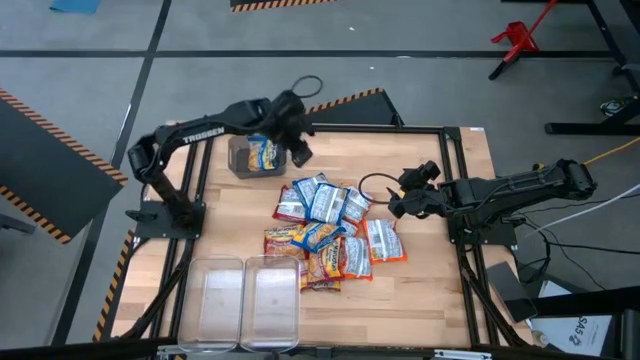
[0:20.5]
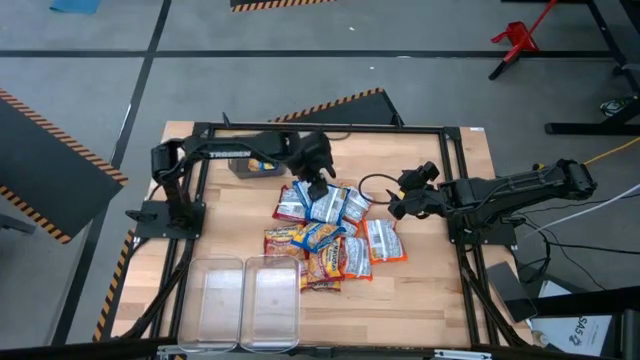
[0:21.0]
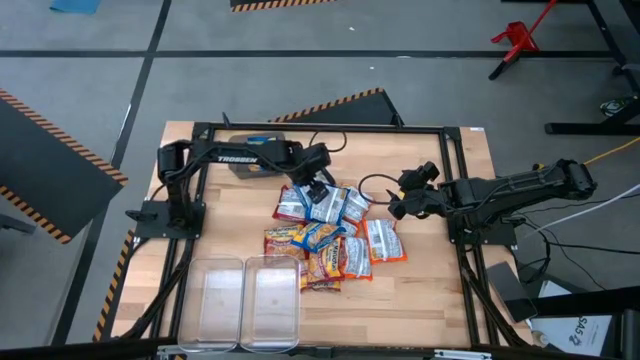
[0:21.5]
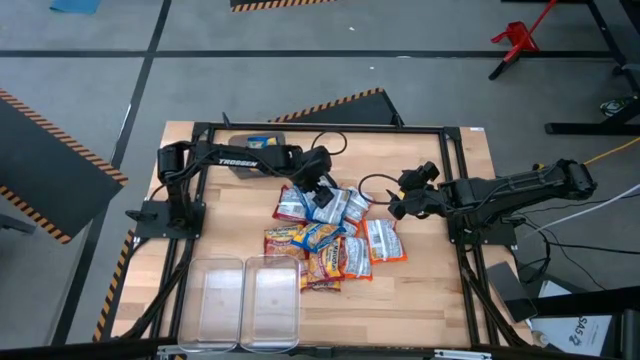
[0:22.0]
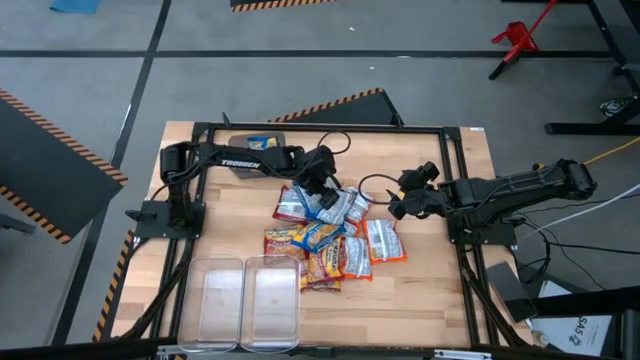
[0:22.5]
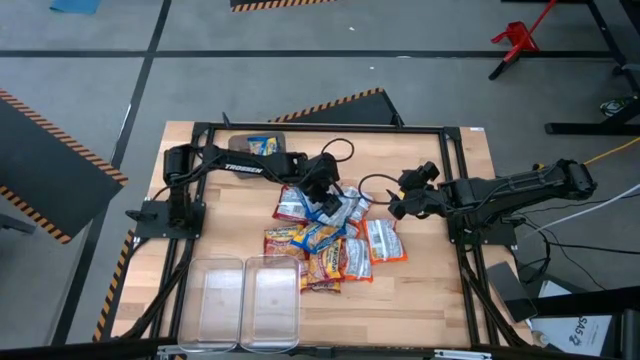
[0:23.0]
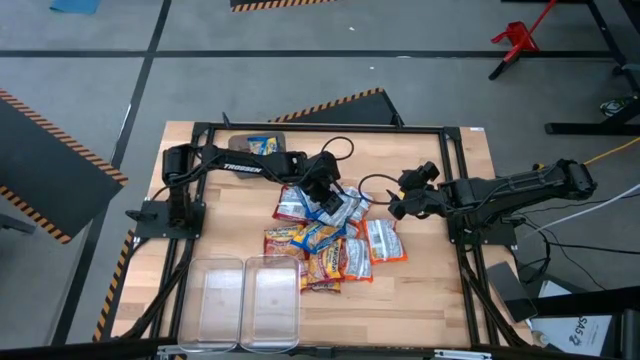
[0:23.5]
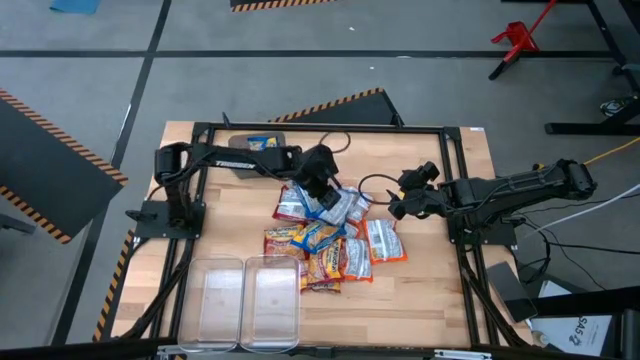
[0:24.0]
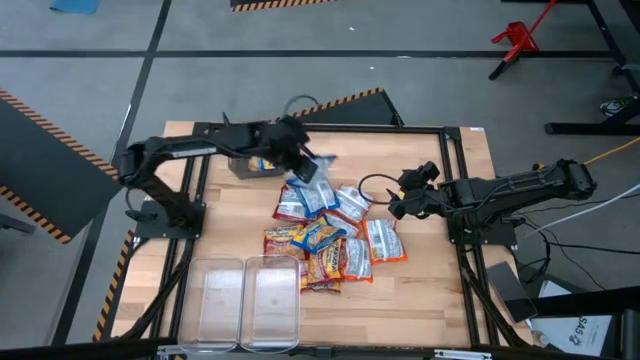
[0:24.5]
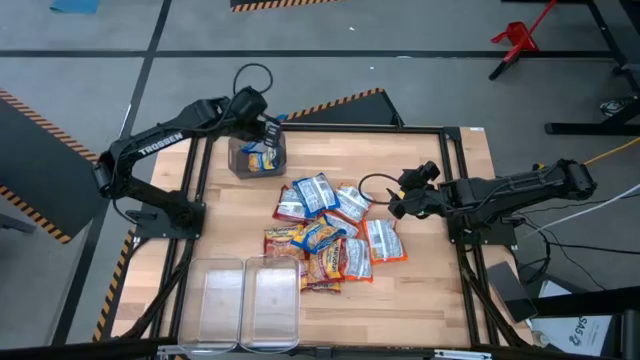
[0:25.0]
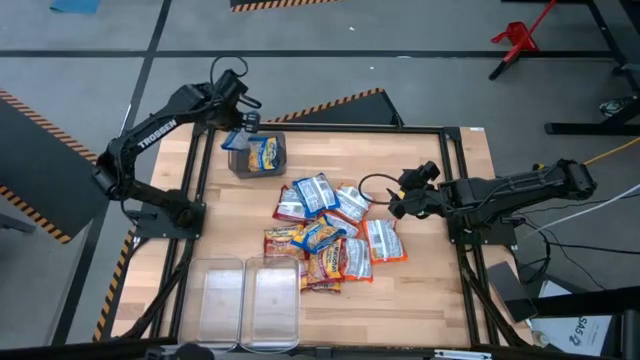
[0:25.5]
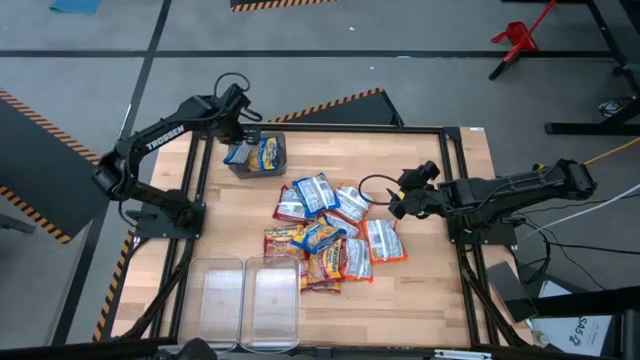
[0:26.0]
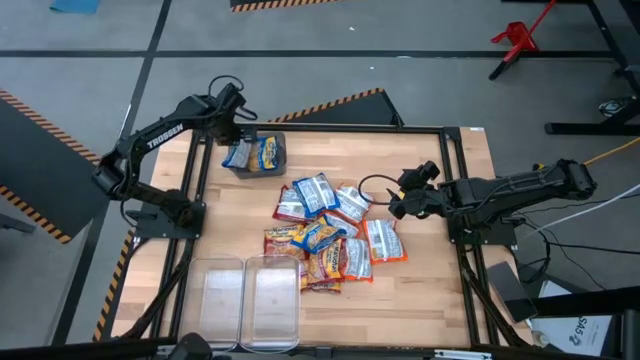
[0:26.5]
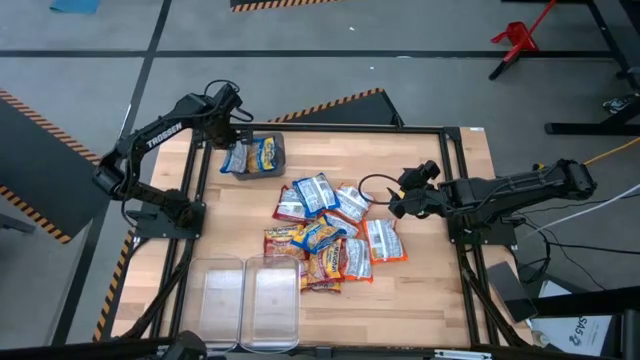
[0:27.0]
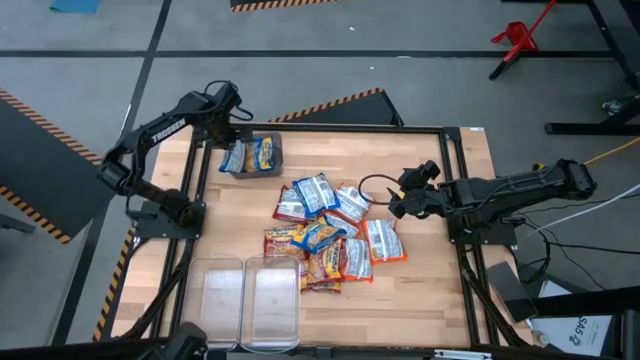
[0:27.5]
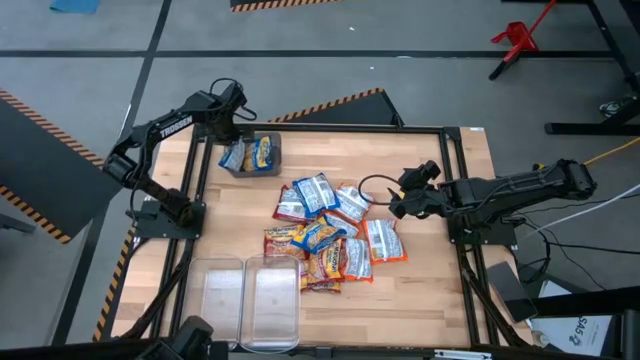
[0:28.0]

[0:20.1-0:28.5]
Task: Sort Maruchan noodles
Put the blue noodle pack into the black bin

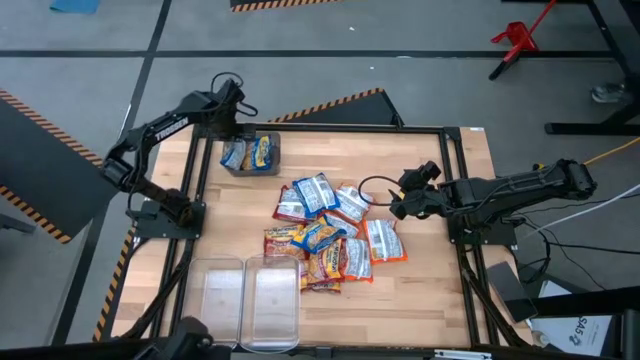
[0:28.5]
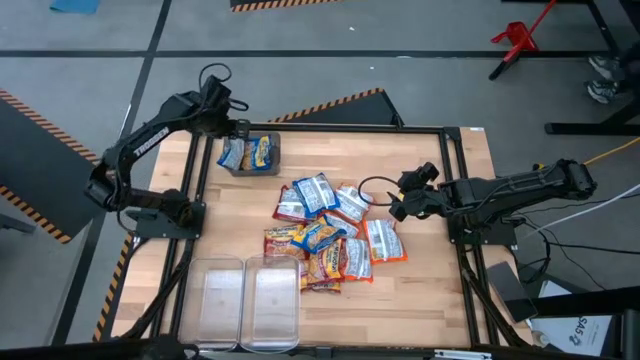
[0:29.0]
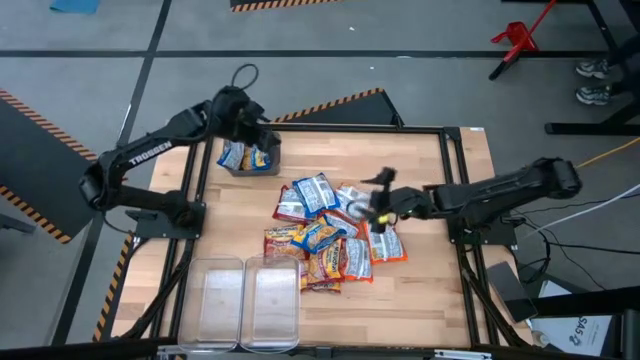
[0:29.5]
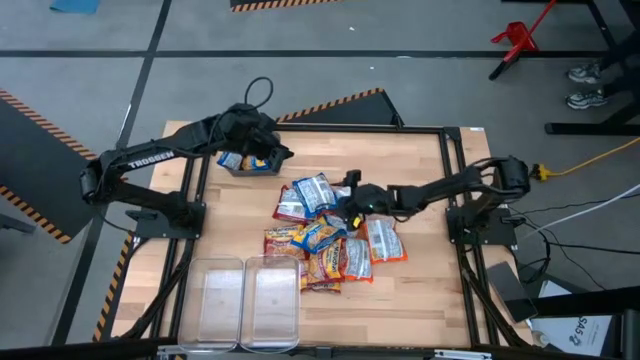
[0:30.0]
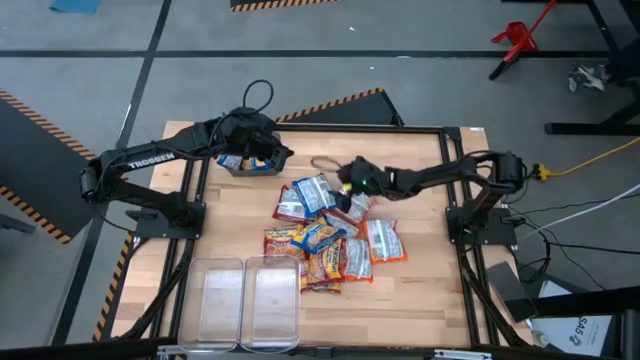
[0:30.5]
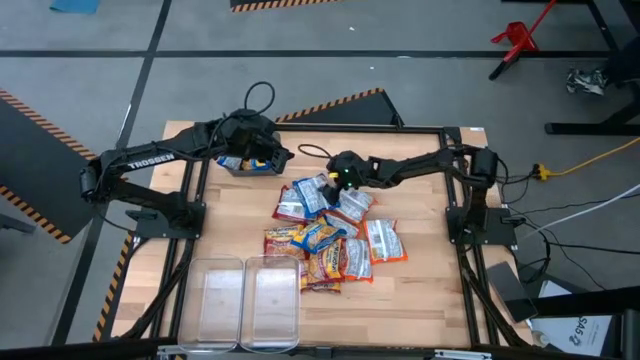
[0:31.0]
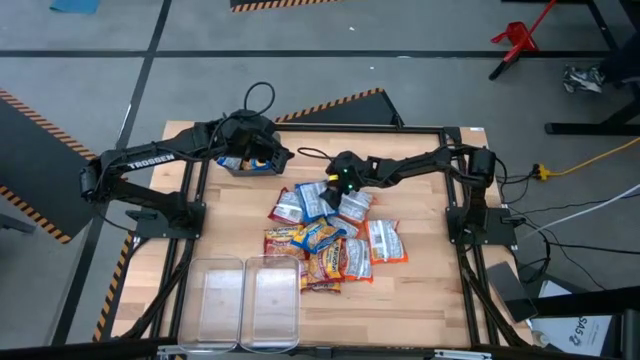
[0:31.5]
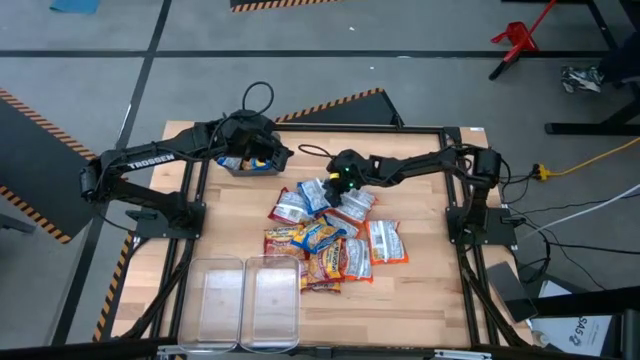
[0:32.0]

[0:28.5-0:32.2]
Put the blue noodle pack into the black bin

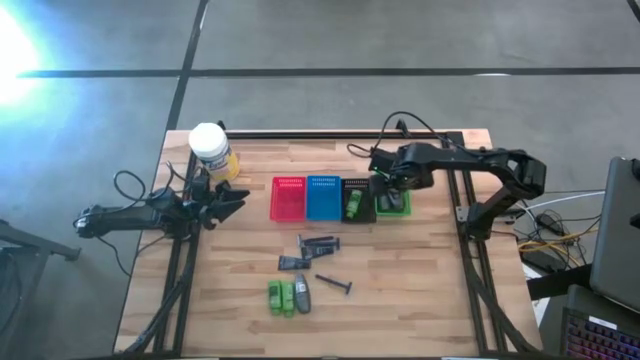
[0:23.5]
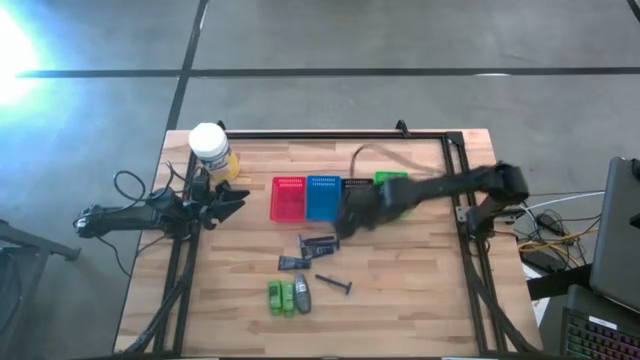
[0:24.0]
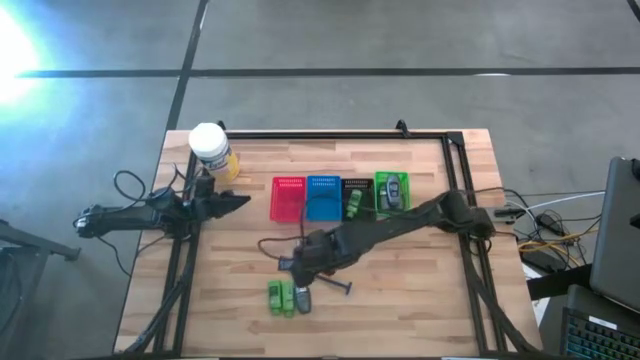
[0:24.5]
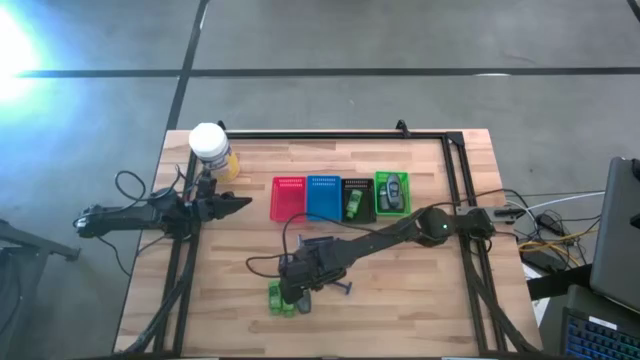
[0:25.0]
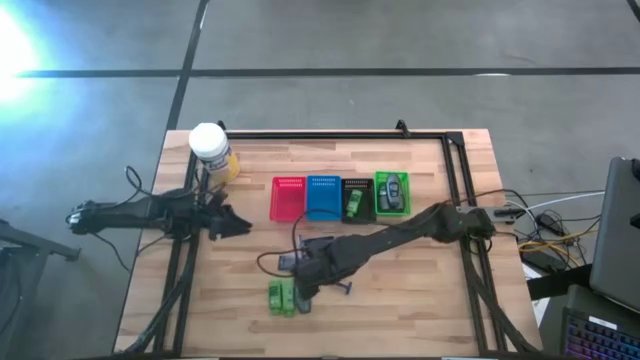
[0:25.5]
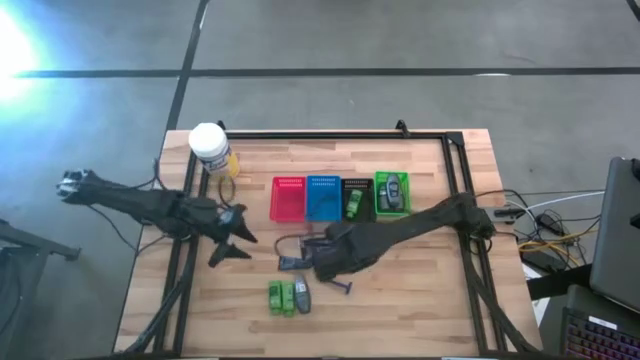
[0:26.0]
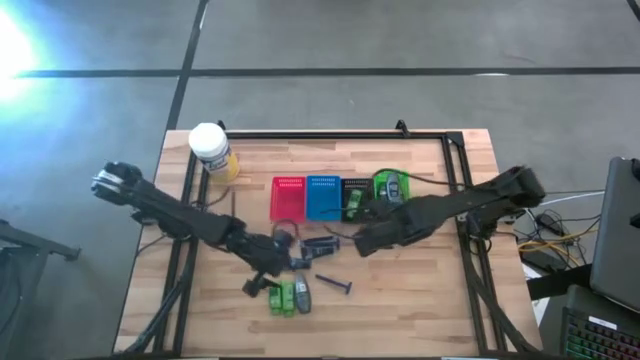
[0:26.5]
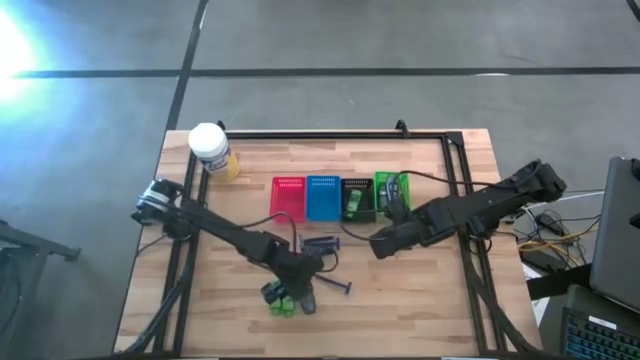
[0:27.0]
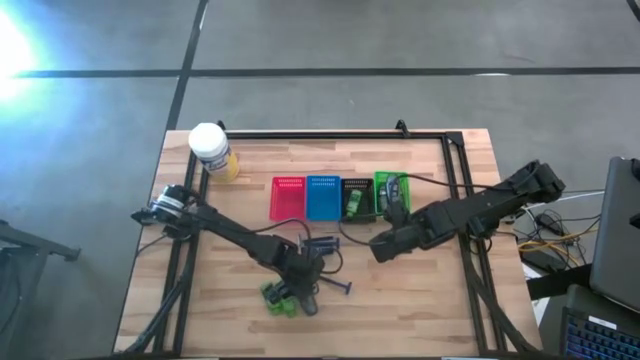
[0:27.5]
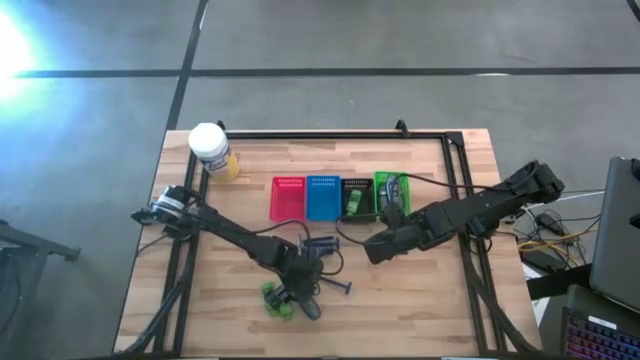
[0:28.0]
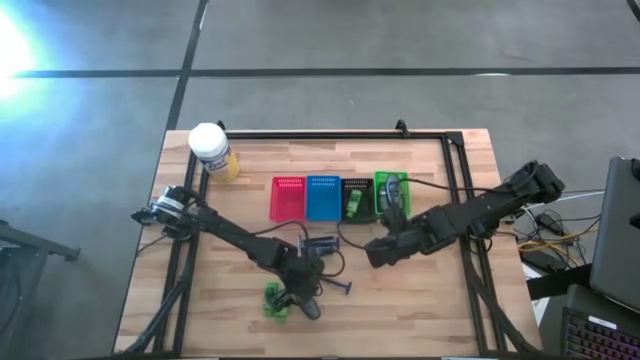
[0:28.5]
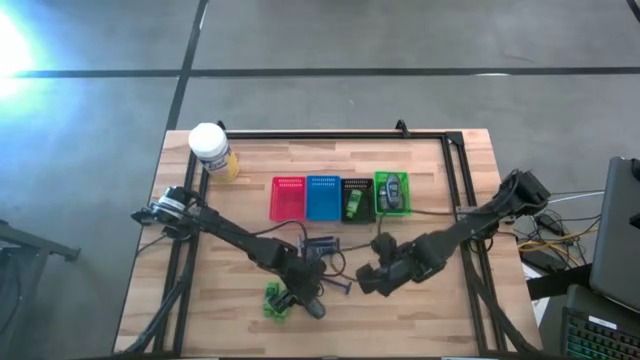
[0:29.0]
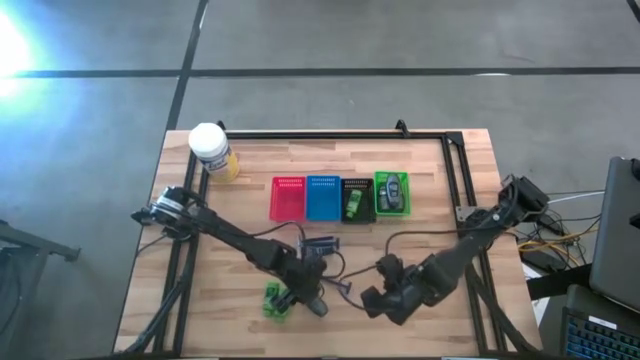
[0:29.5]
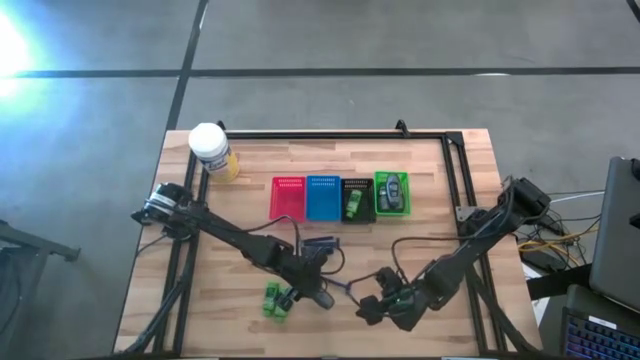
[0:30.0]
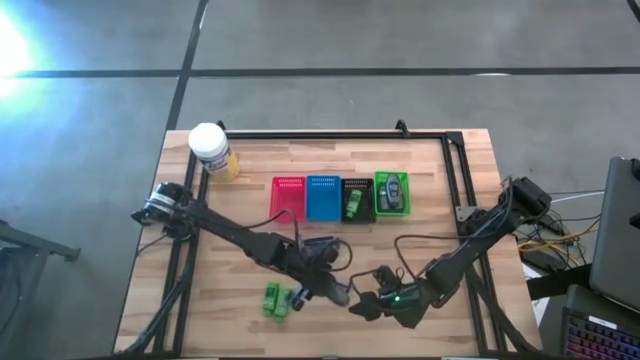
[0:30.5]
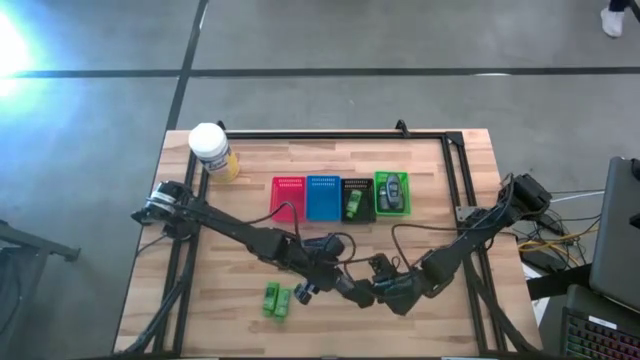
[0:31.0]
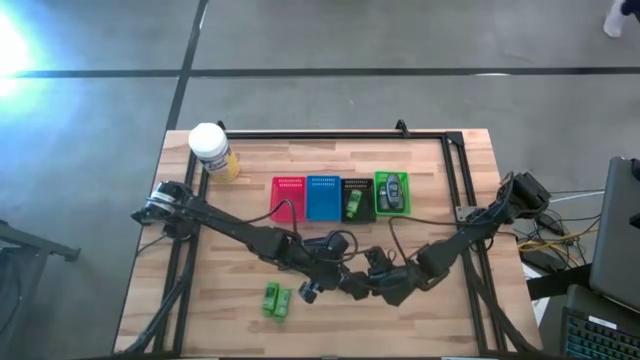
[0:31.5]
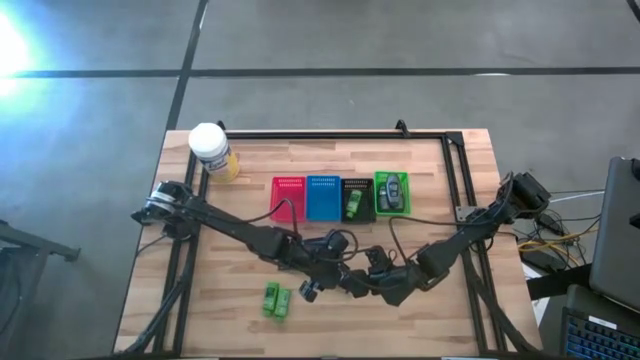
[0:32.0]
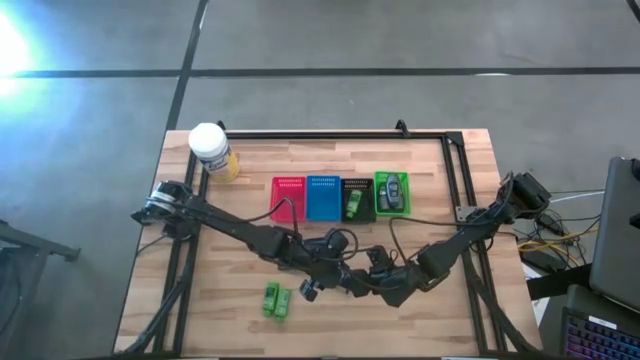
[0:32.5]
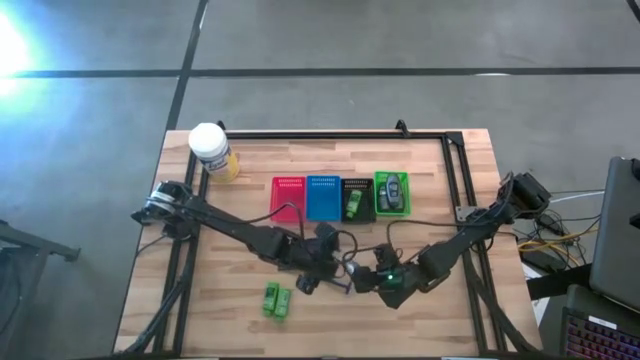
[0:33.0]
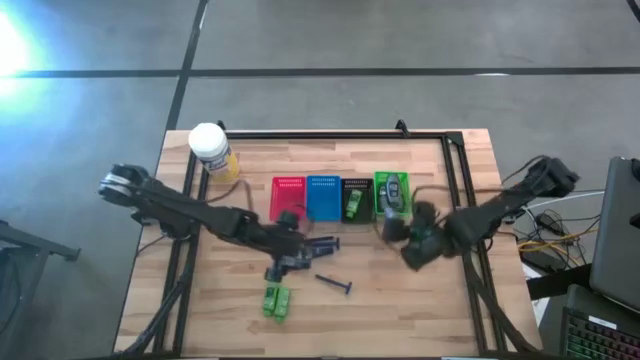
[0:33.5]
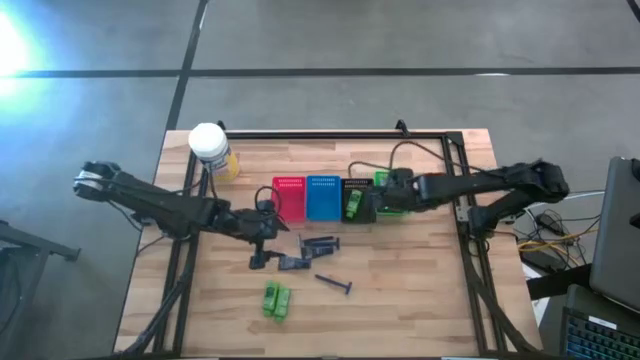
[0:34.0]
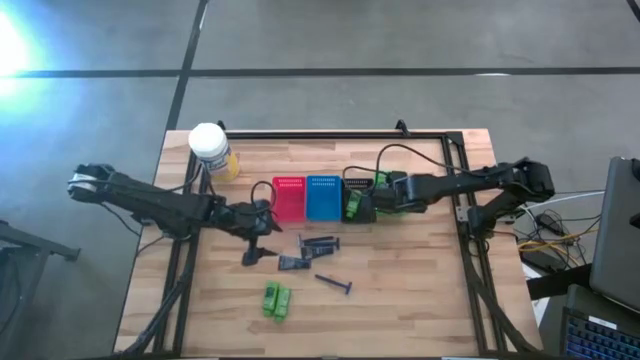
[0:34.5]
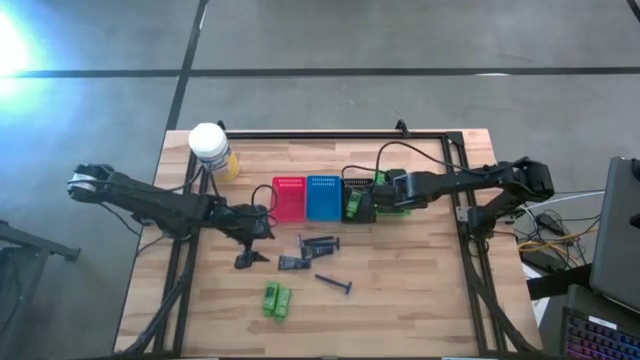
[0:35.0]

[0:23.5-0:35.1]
Task: Pick & Place Travel size toiletries
Put the deodorant into the green basket
